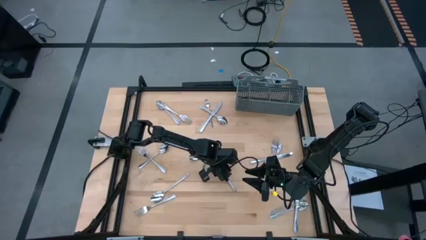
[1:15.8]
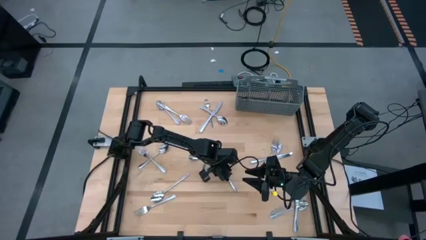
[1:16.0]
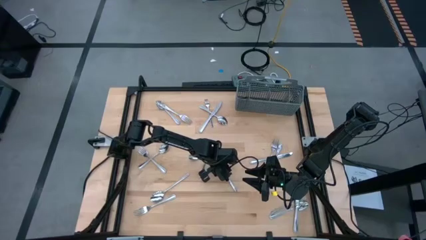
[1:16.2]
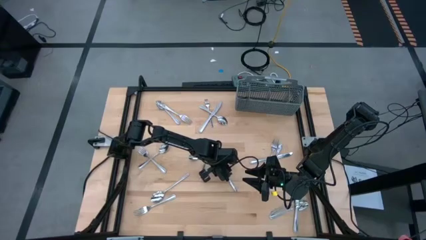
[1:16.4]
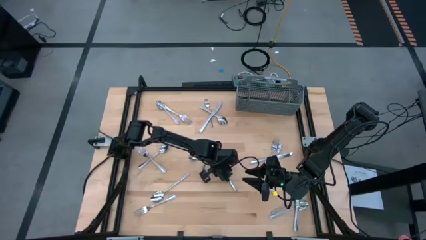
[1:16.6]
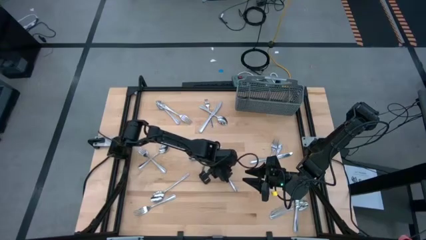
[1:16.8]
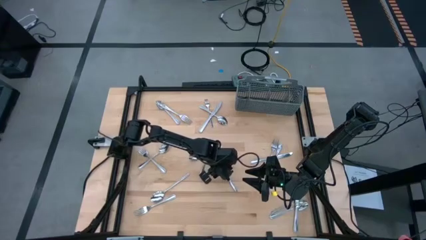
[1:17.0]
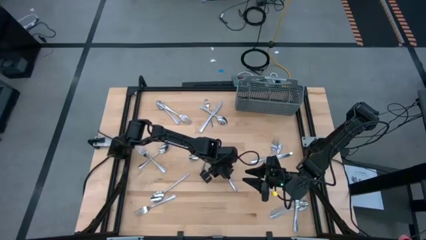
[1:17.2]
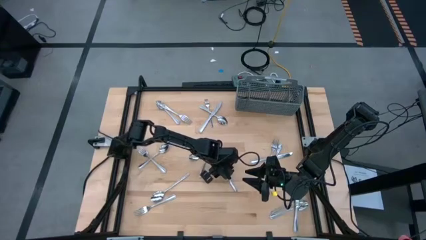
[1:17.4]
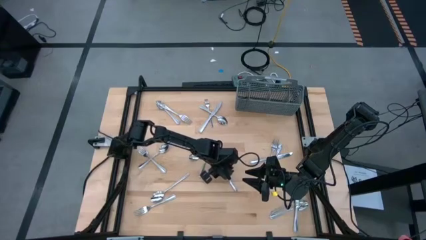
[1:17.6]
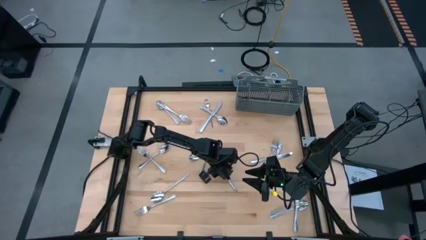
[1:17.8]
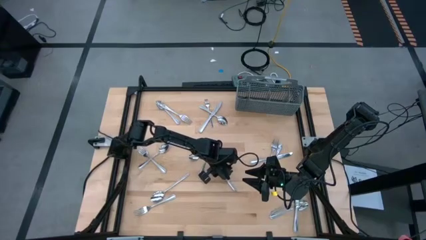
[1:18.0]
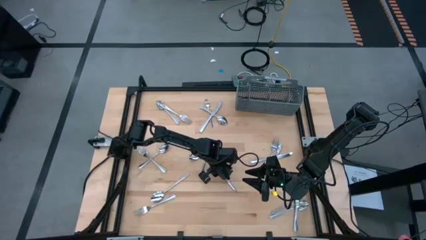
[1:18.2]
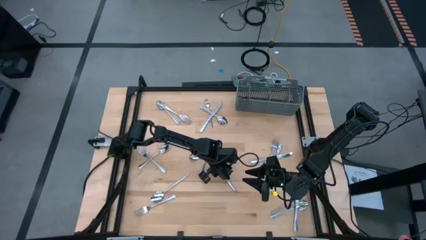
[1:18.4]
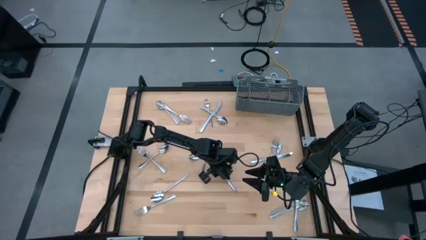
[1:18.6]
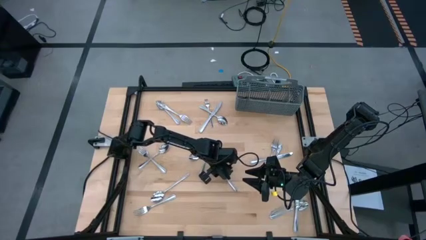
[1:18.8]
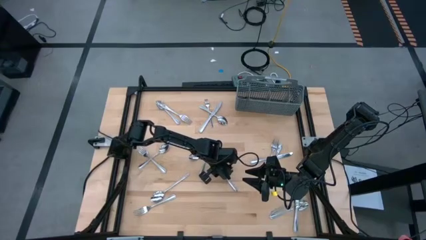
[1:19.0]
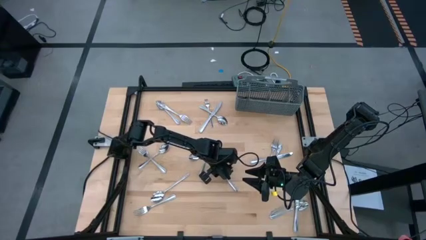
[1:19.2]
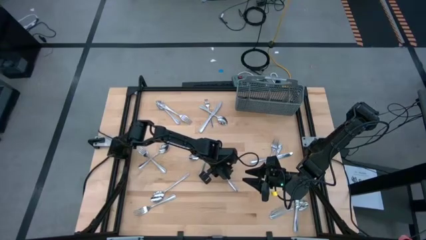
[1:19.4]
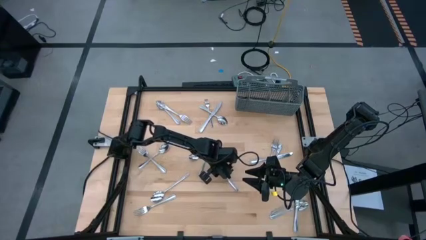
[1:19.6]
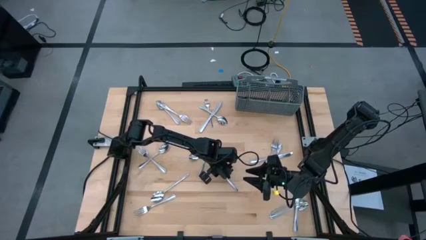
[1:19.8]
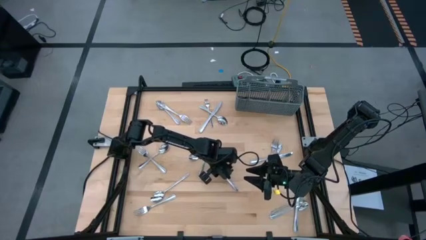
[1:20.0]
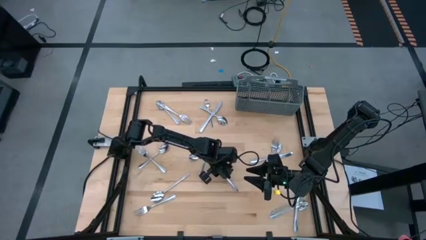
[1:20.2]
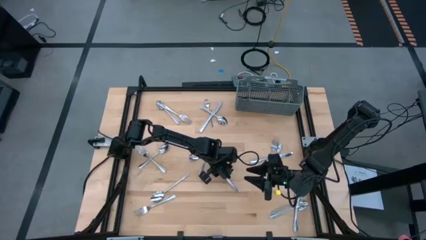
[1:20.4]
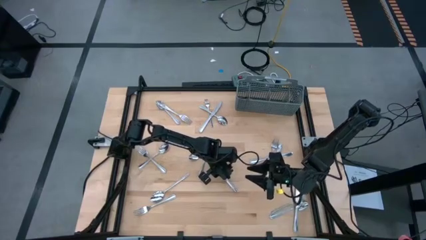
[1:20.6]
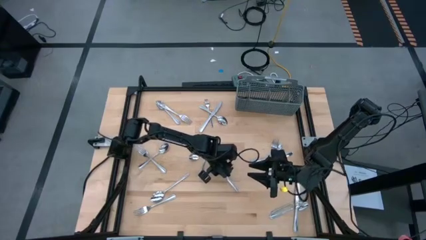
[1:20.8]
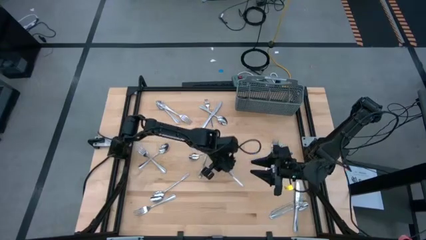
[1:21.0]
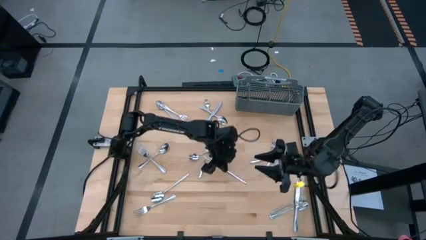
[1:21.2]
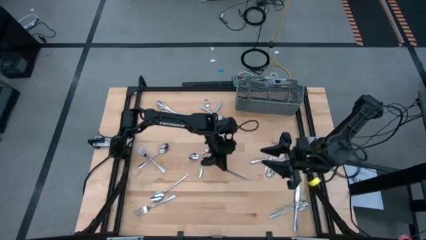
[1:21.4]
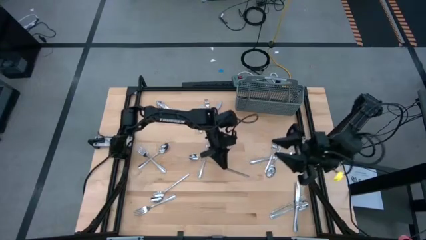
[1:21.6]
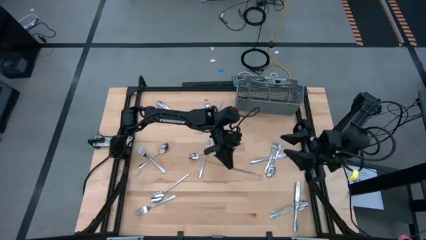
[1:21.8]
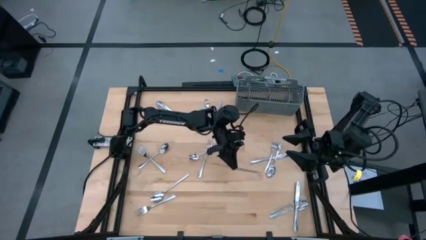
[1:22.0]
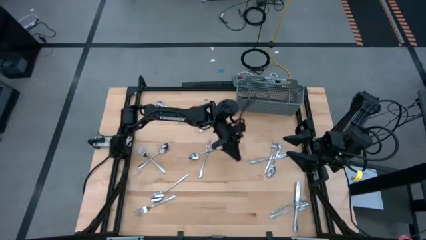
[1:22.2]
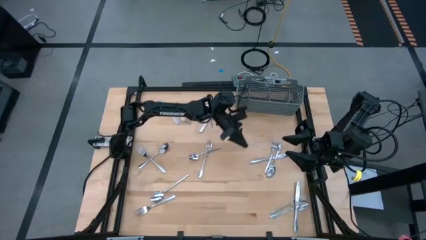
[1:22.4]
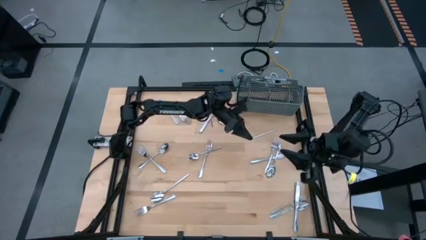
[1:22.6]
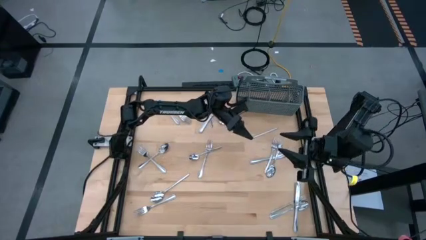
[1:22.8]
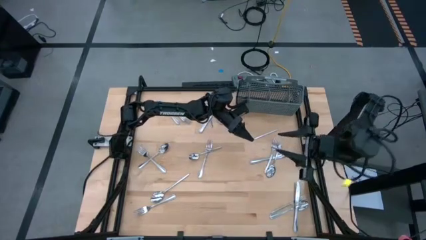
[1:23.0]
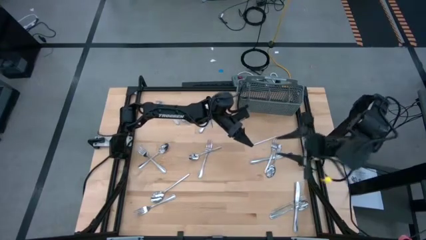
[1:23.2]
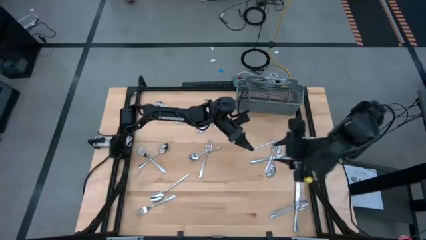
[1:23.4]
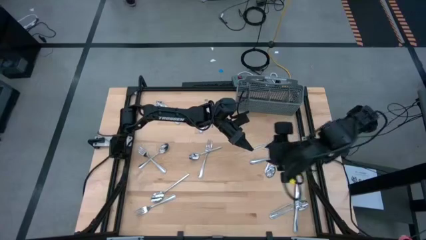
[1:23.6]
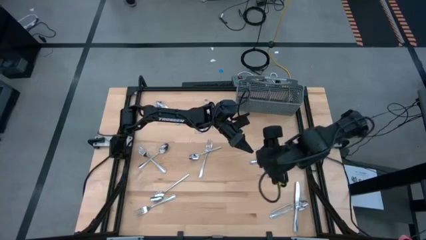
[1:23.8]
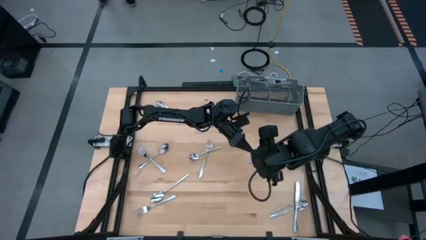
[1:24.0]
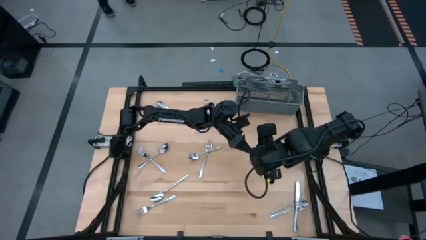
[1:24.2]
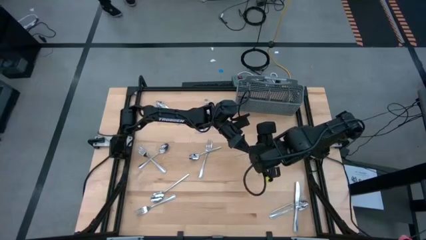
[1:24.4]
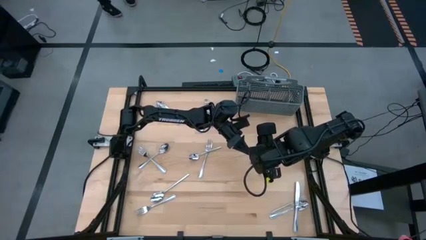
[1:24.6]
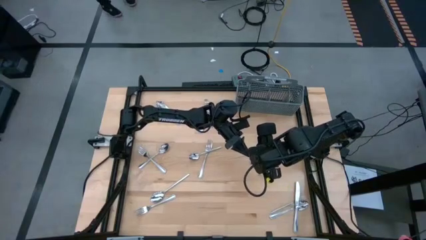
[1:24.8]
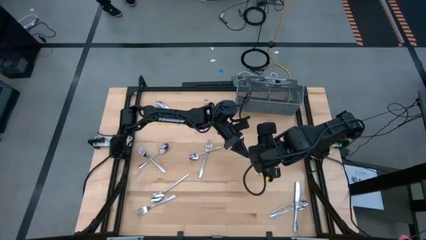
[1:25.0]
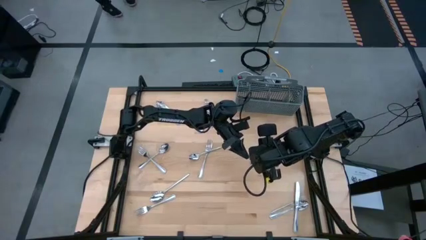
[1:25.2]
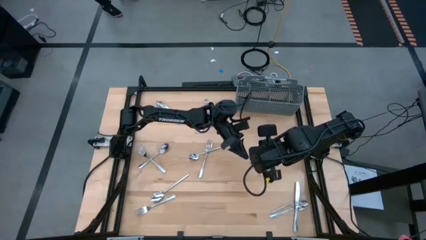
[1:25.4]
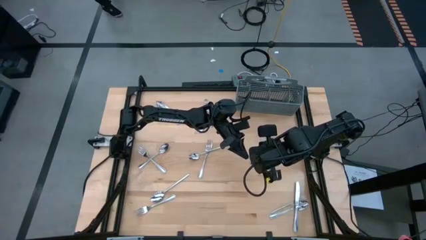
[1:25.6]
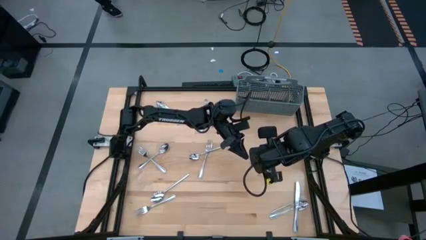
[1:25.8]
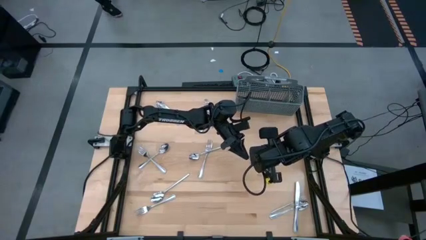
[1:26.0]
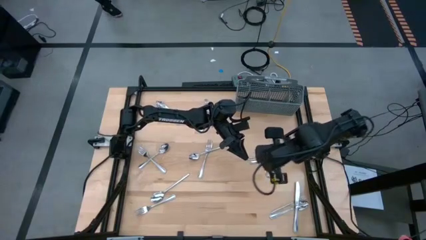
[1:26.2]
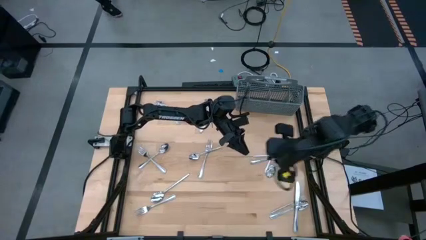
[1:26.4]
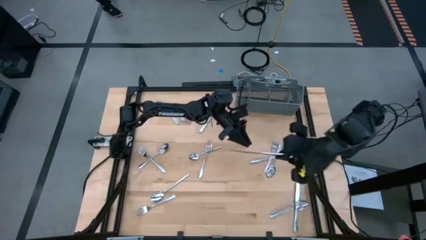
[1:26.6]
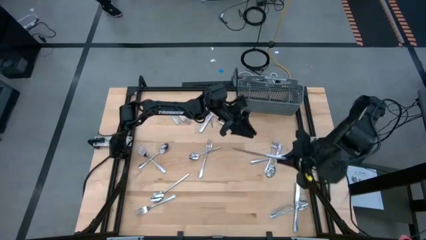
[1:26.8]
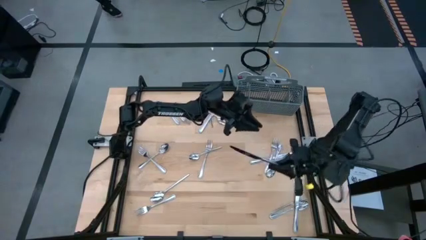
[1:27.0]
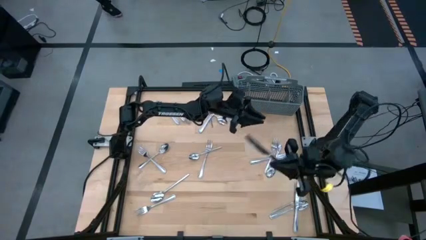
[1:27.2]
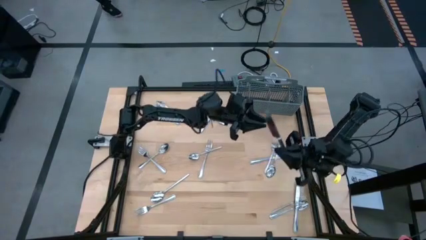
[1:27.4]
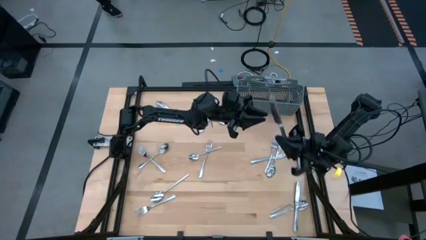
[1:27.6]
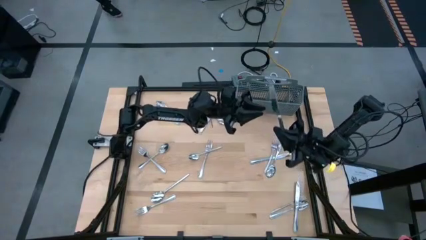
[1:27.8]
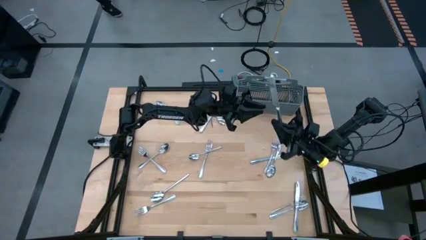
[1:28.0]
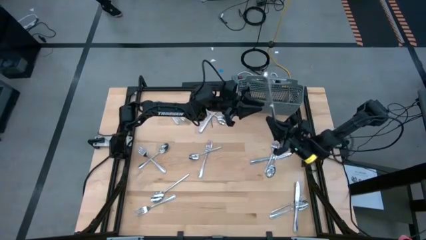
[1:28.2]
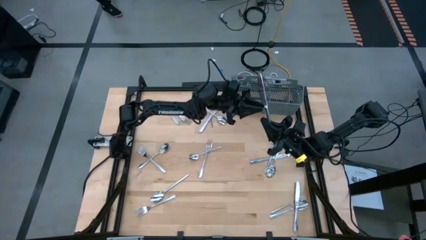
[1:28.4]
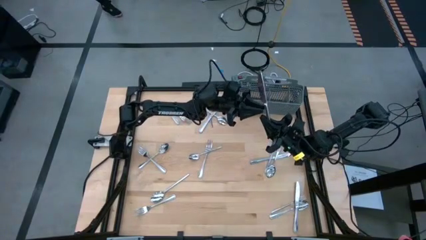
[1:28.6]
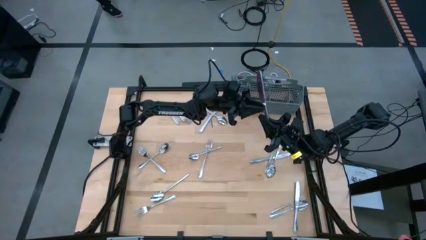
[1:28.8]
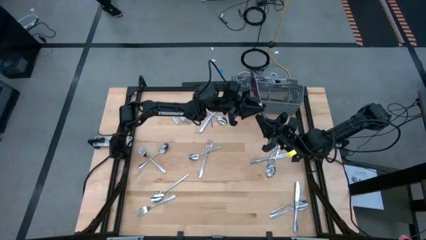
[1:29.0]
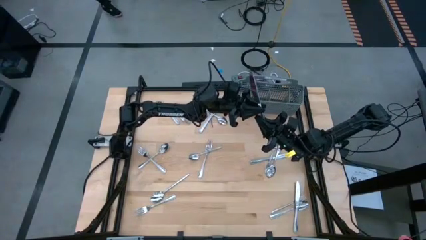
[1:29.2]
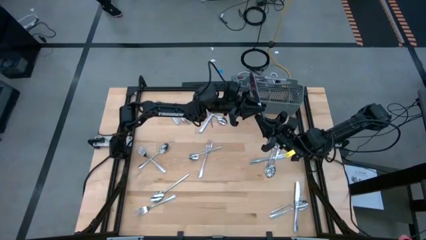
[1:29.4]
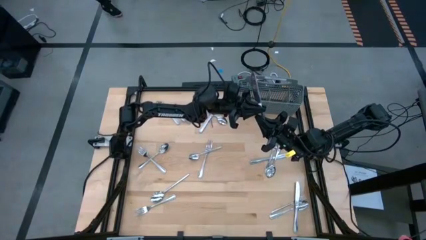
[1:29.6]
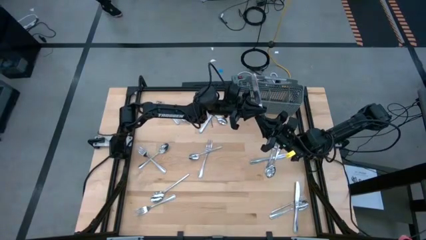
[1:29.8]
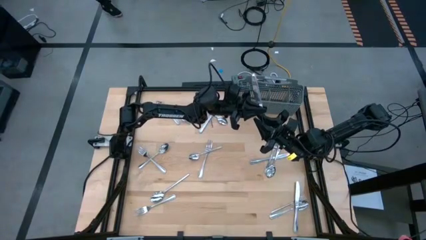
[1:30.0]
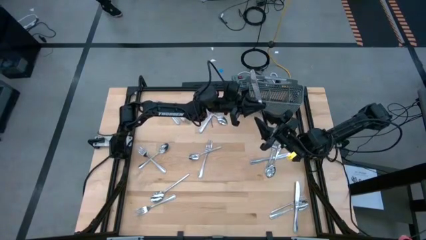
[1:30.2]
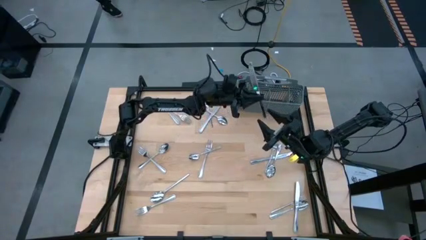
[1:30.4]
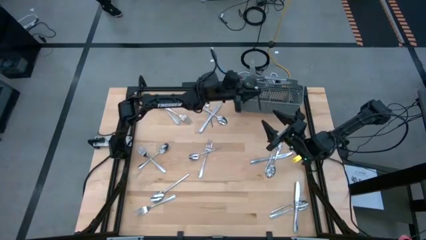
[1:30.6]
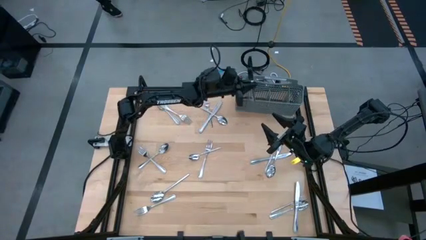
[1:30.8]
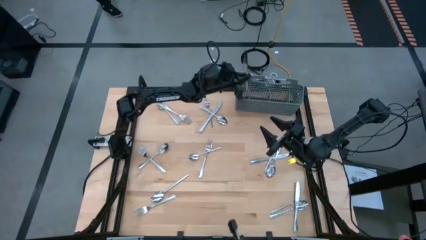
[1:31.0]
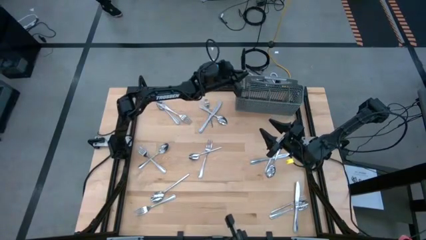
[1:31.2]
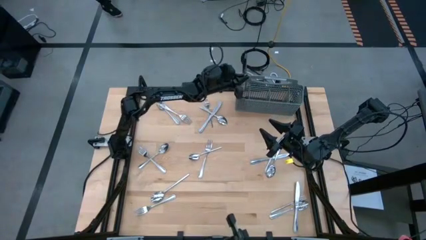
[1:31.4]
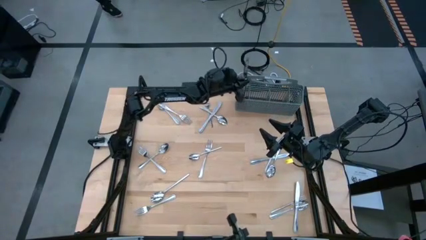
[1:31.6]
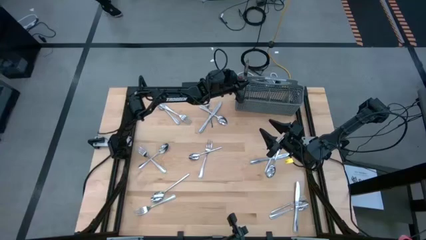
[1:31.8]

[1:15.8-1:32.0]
Task: Sort silverware
Put the silver knife into the silverware basket

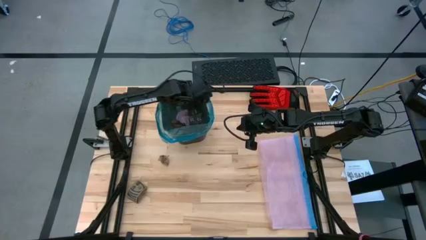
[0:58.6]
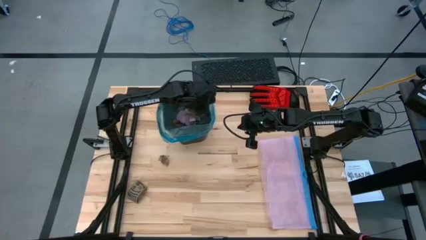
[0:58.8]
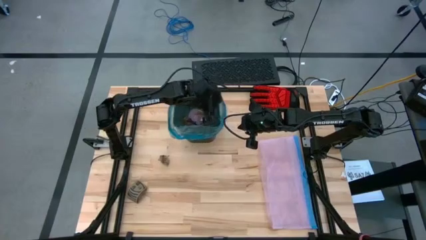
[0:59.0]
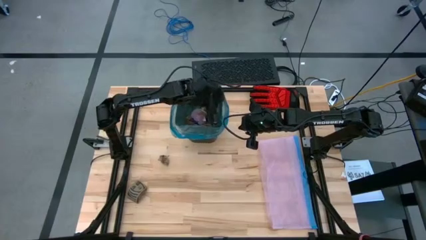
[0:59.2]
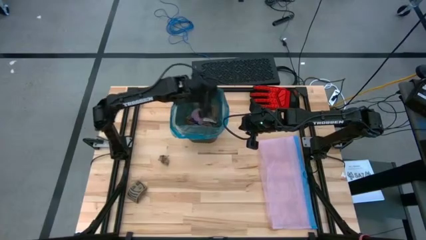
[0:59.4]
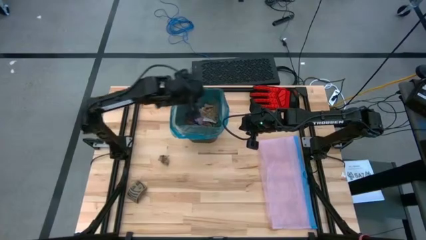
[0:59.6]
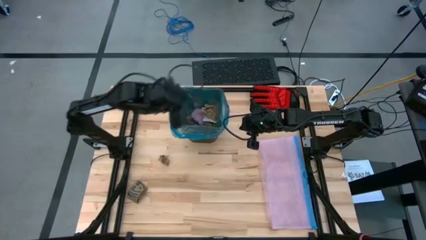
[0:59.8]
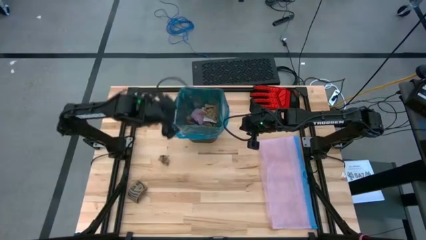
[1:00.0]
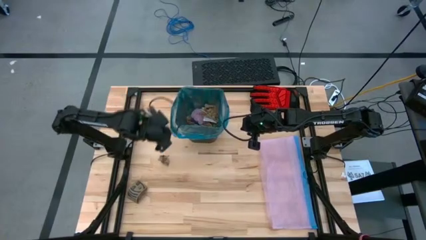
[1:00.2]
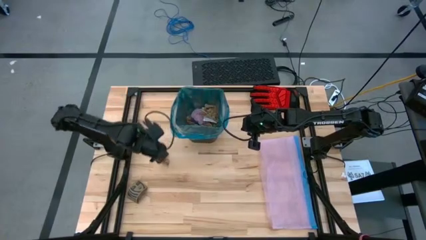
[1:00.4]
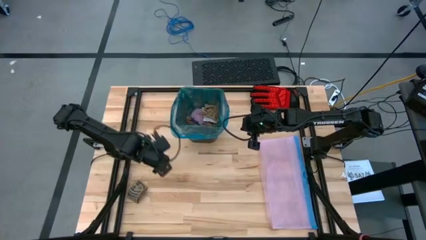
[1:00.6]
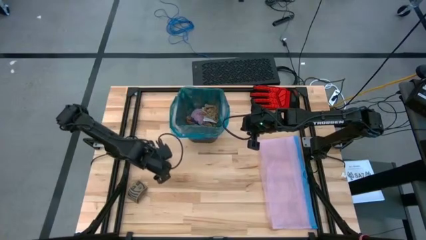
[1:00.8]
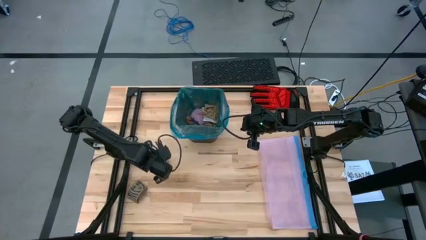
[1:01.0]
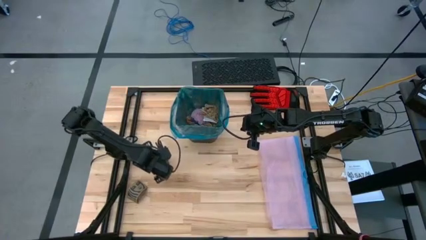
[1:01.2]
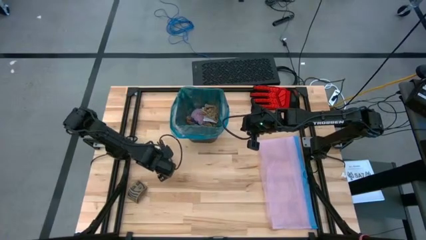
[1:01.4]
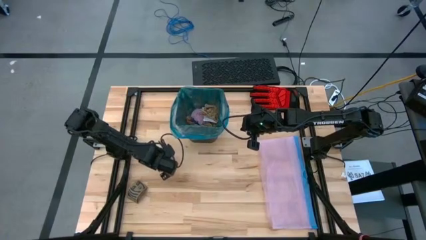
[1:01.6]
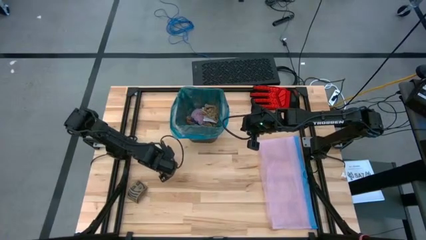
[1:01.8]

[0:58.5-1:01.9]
Task: place trash/remove bag and relplace
Put the brown napkin into the black trash bin
